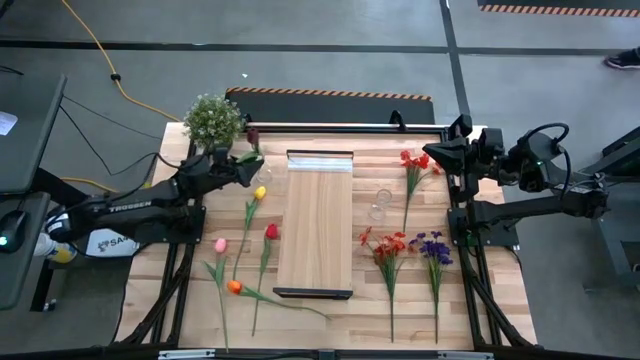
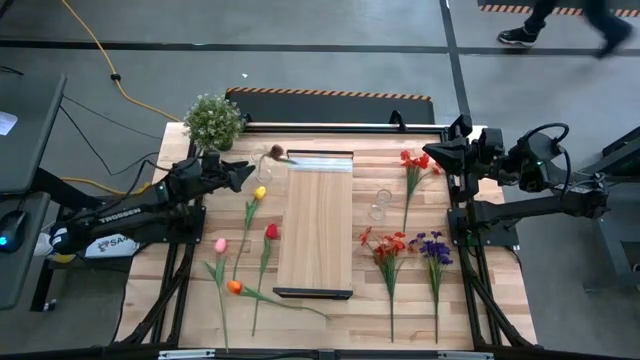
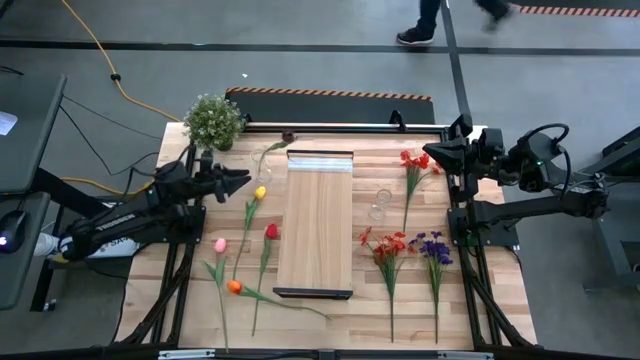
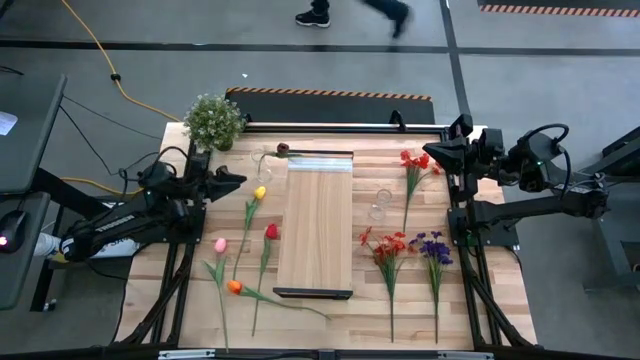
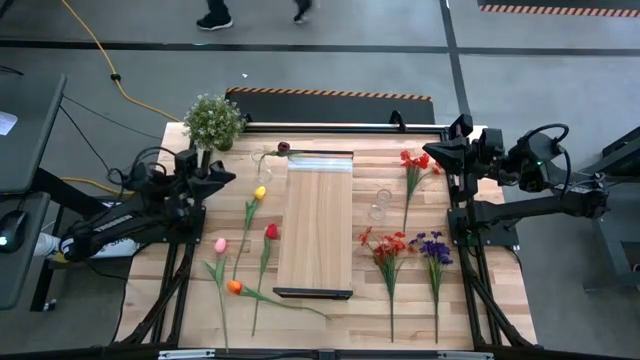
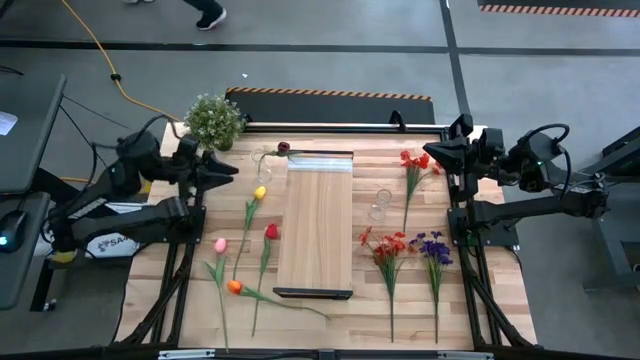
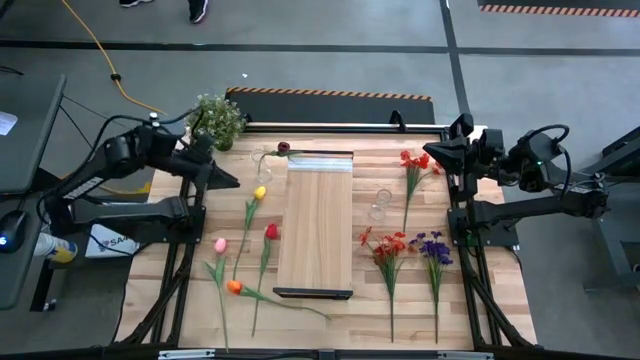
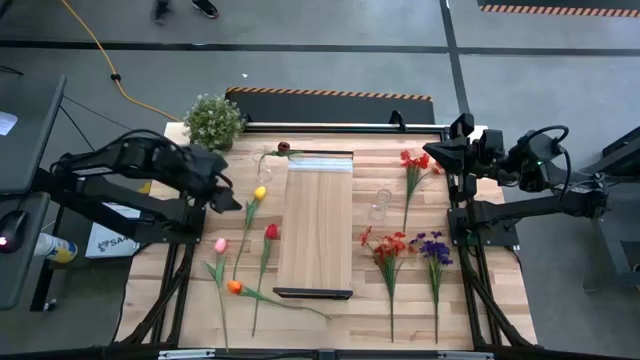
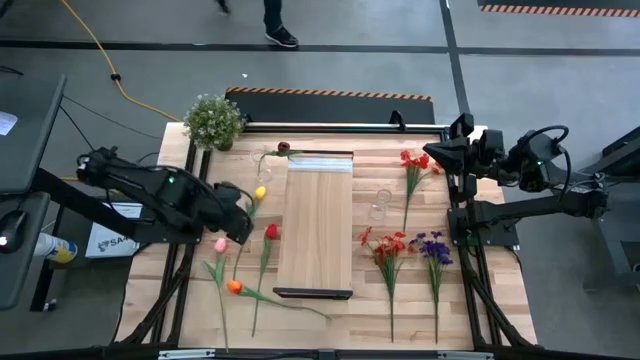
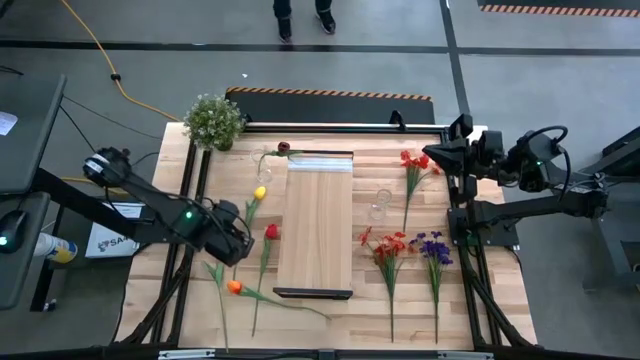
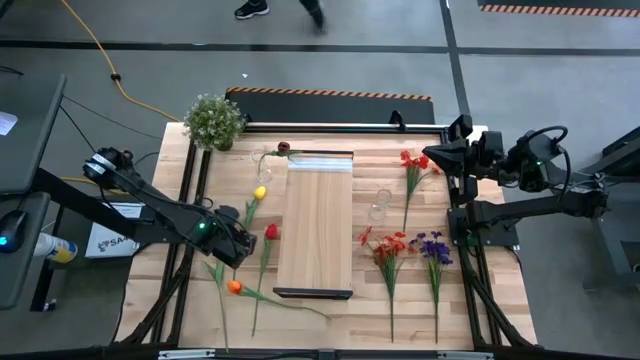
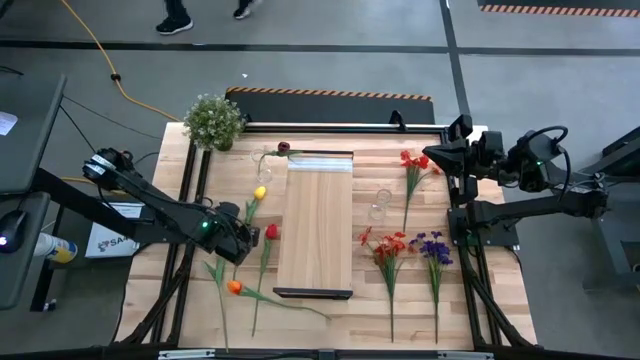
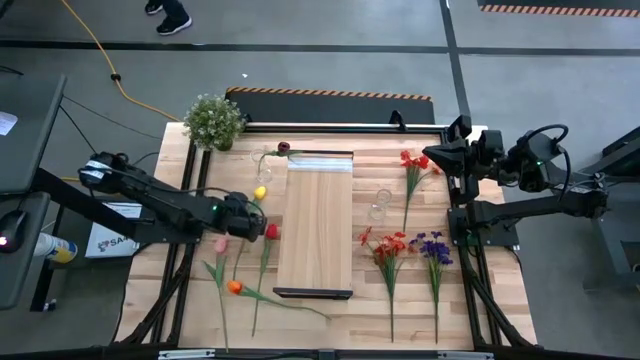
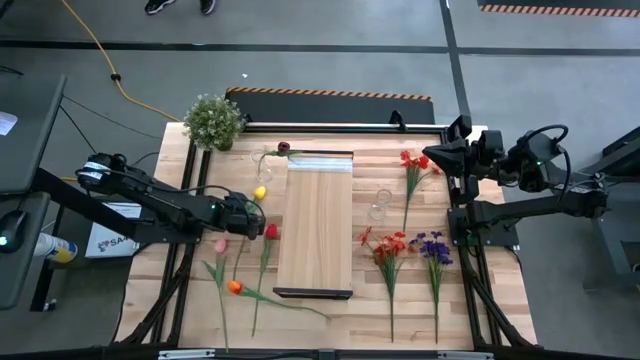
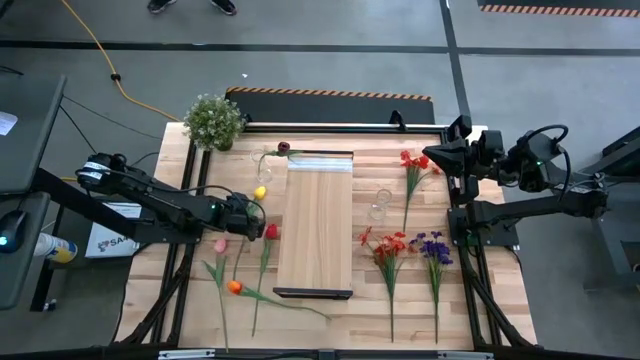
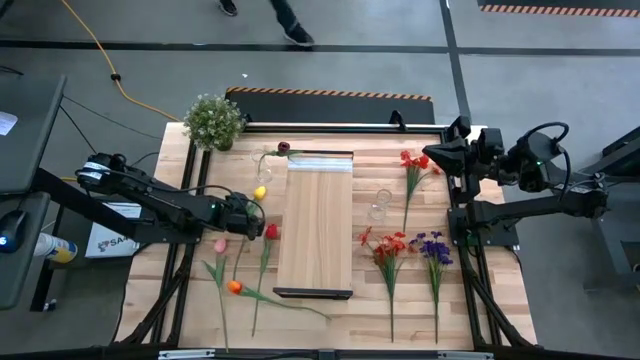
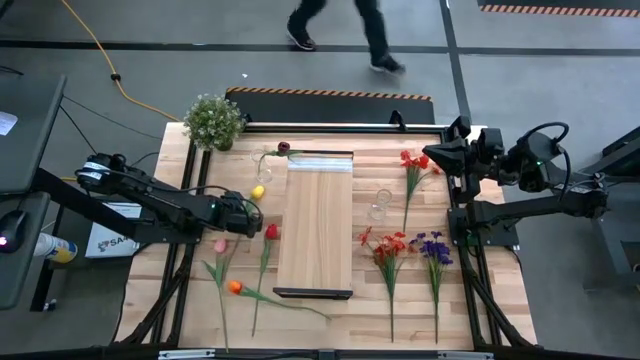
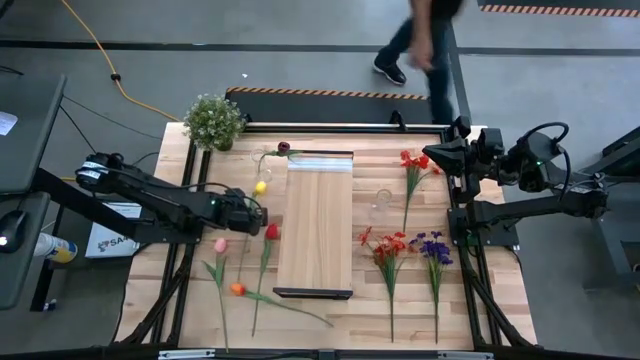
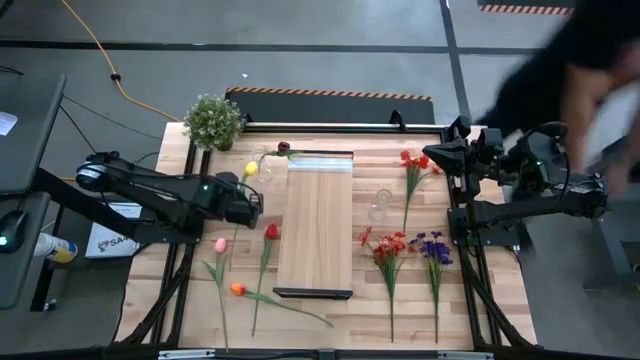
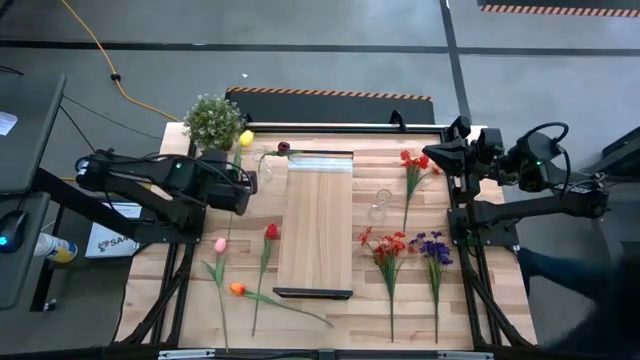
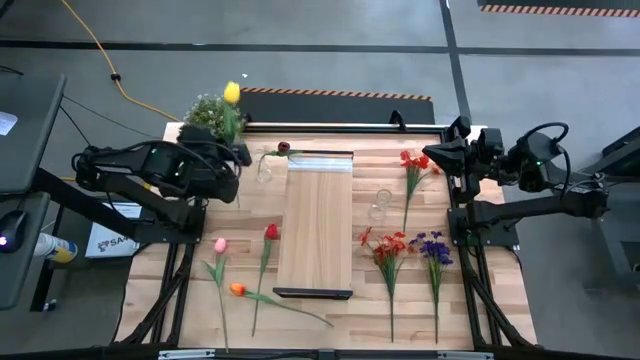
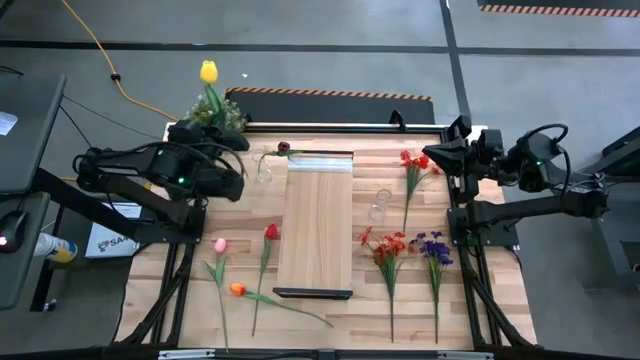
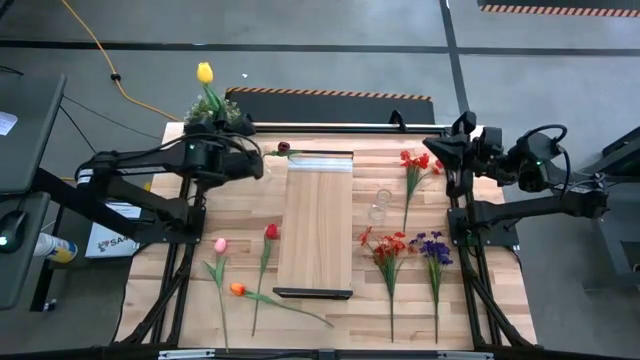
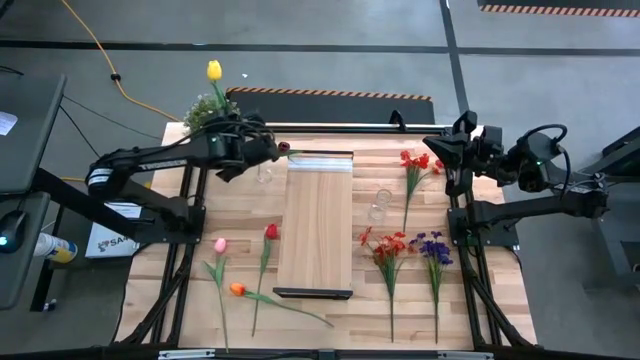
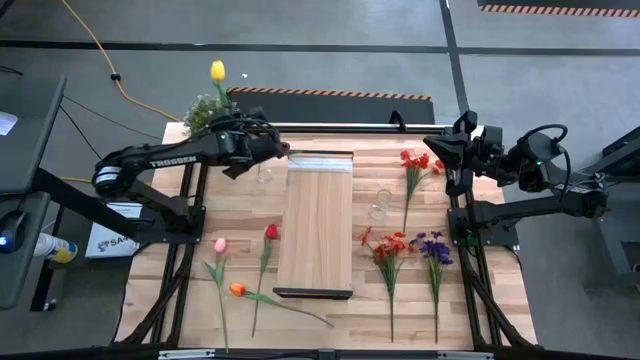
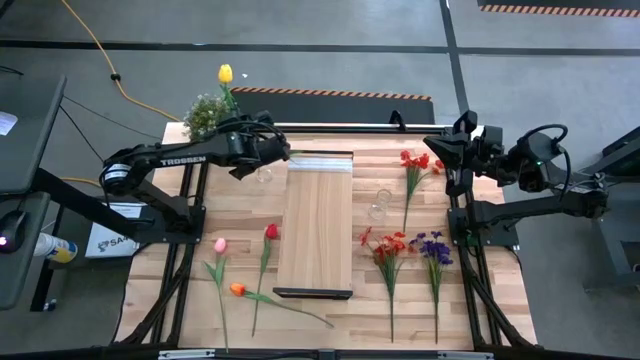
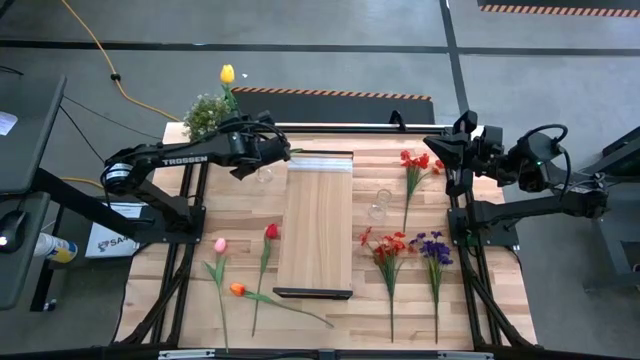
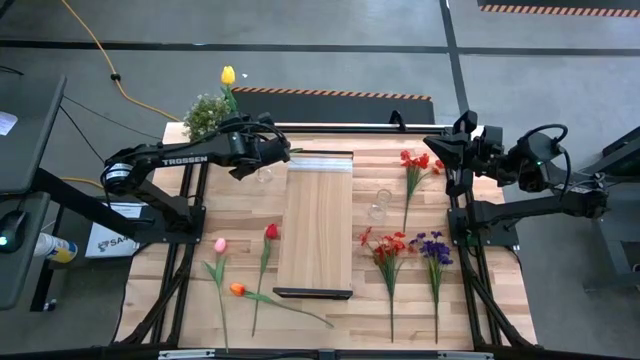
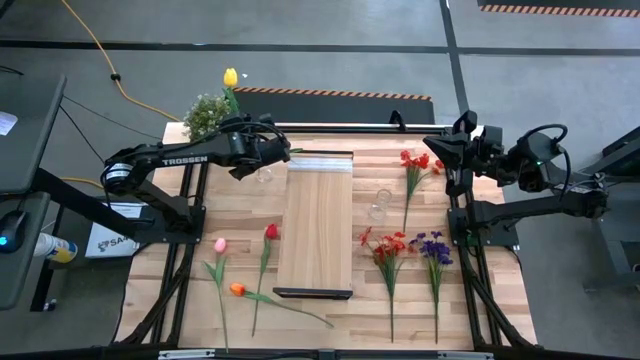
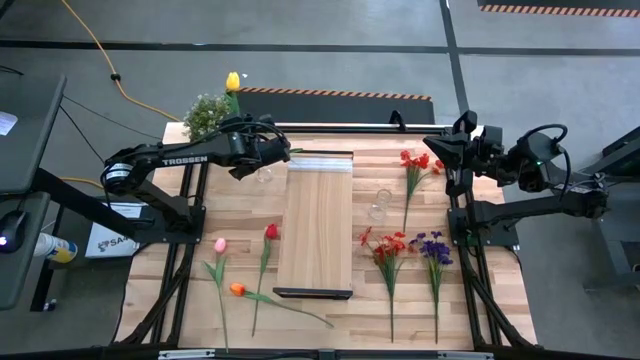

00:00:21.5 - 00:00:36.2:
Task: Pick and place flowers into a vace then onto a shelf
Put the yellow flower into the left vase

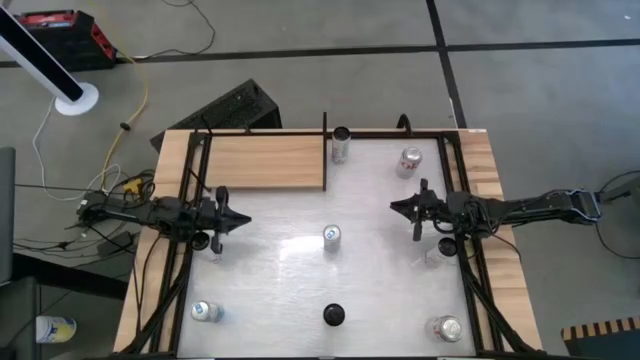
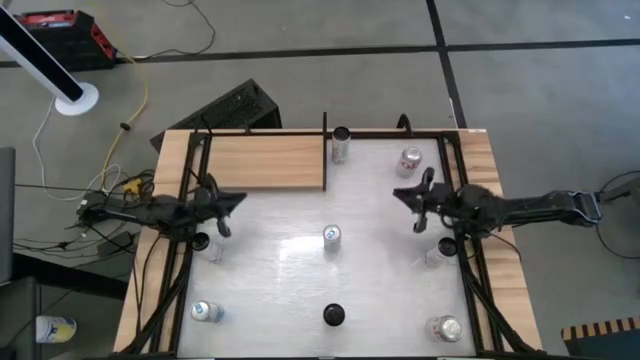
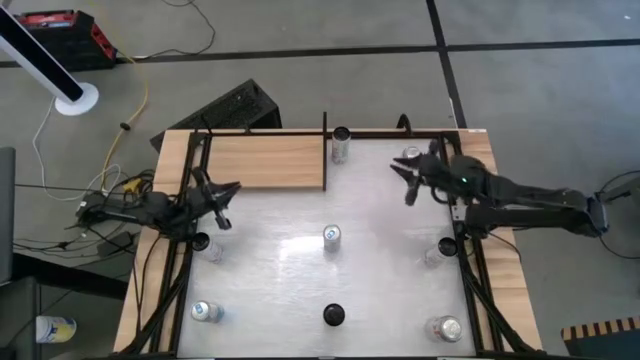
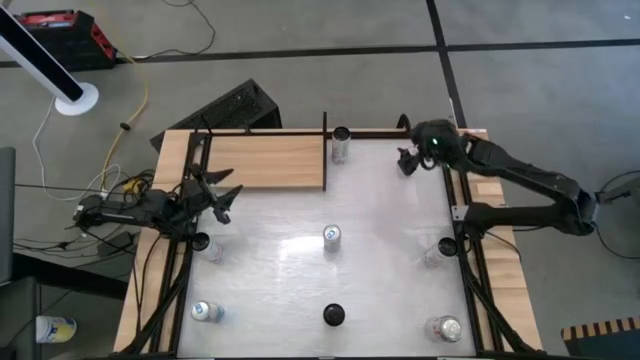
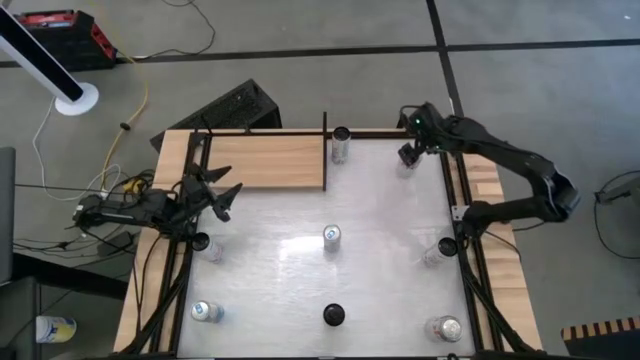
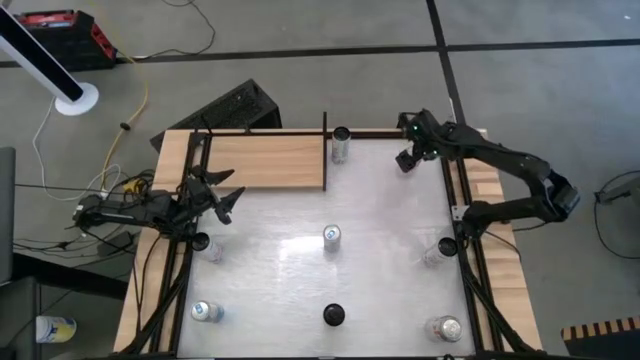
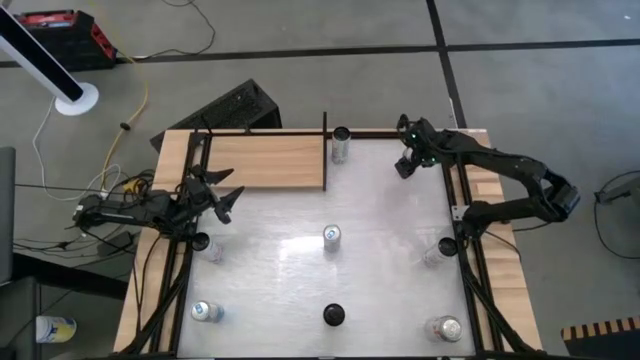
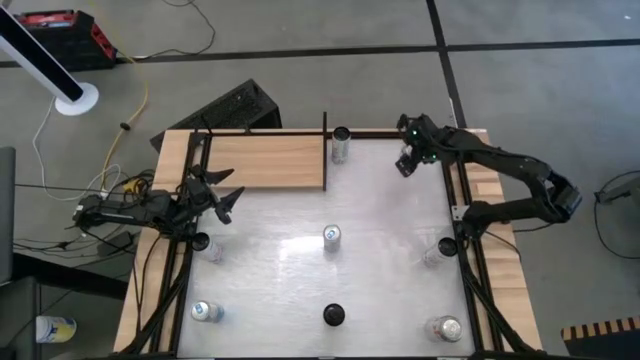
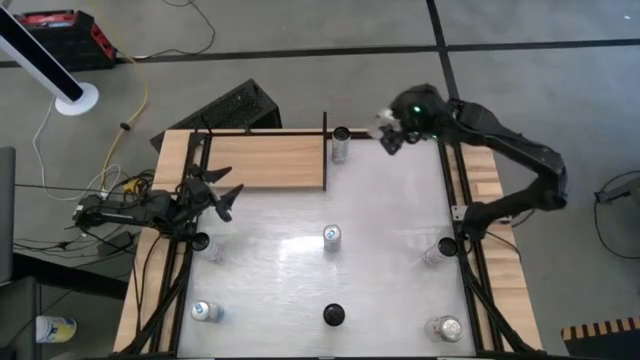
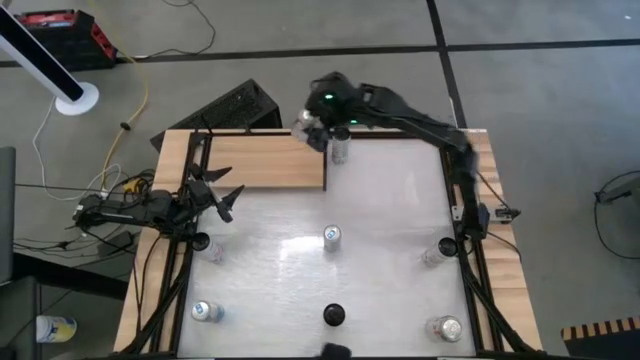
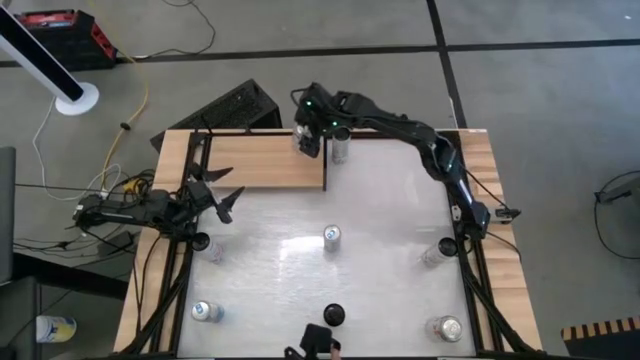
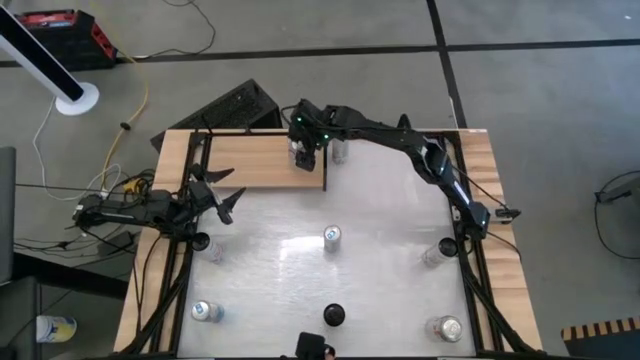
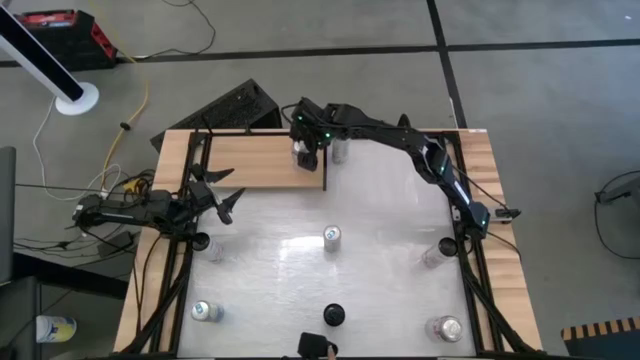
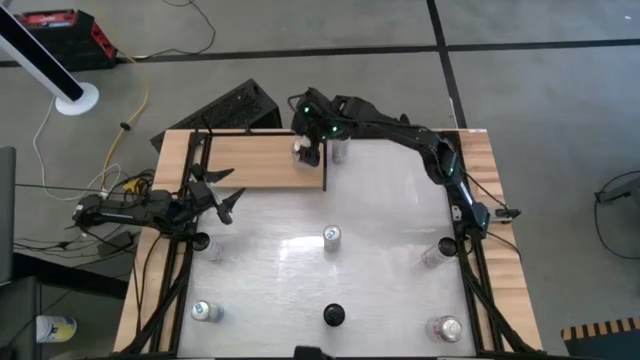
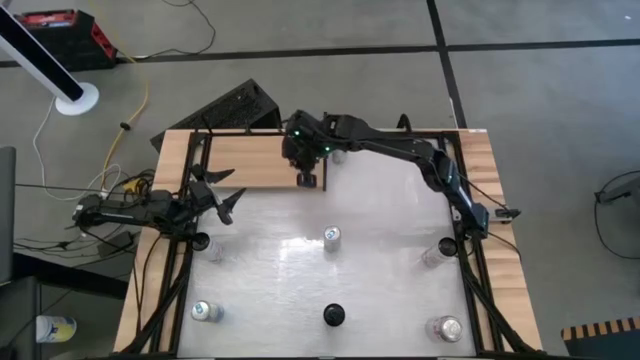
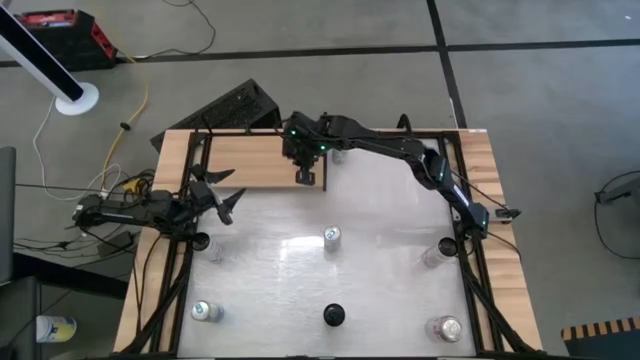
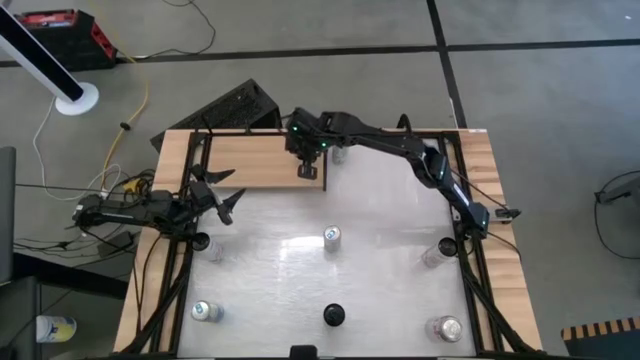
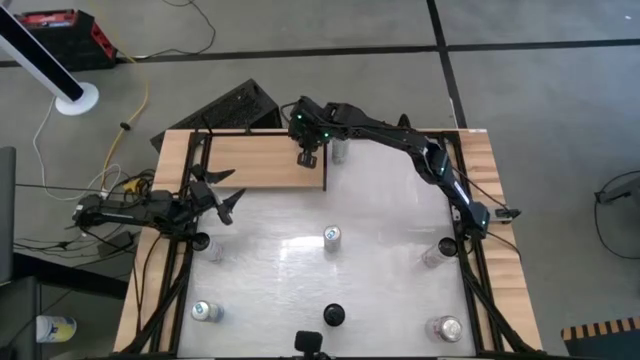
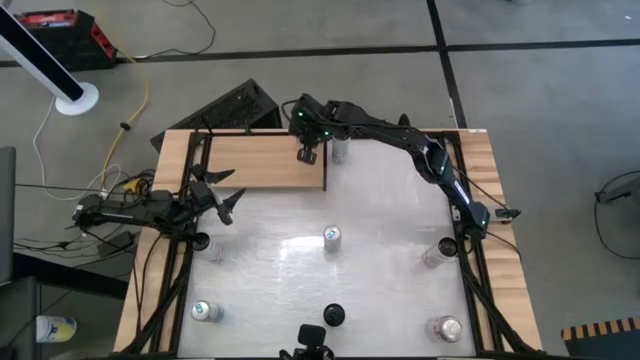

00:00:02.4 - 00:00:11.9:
Task: Place canned beverage on shelf
Put the top silver-red soda can on the shelf
